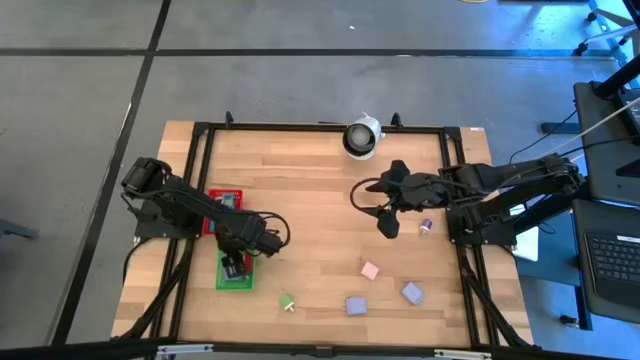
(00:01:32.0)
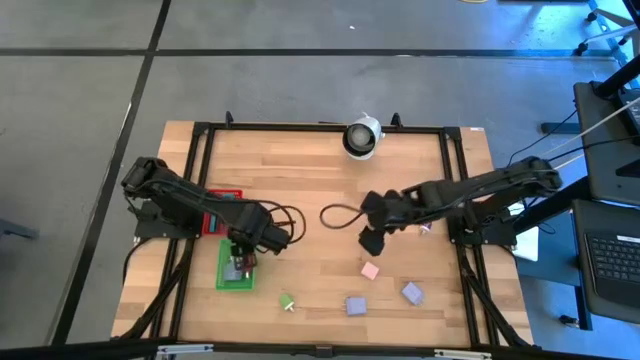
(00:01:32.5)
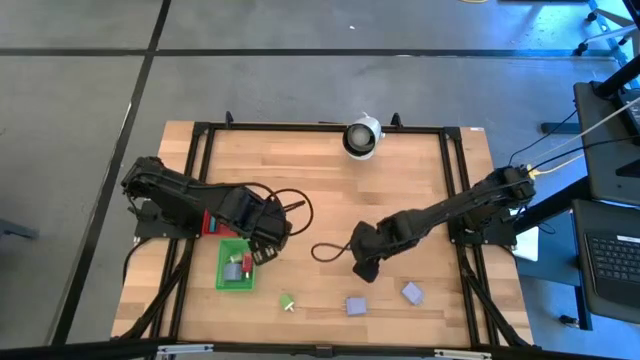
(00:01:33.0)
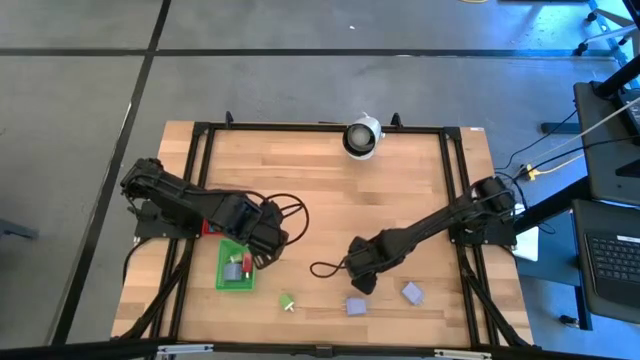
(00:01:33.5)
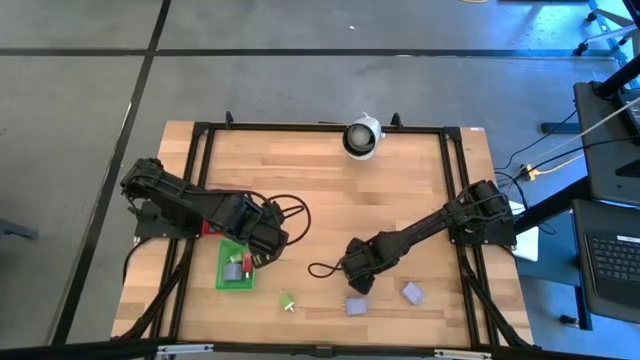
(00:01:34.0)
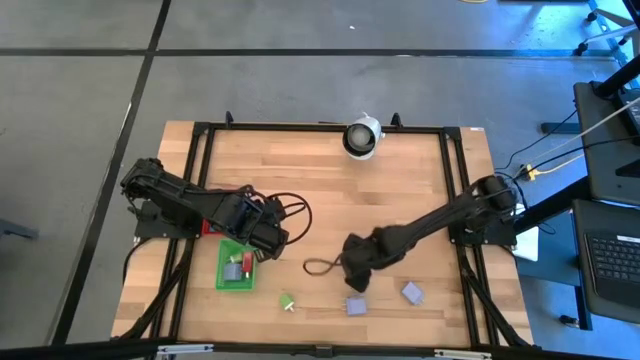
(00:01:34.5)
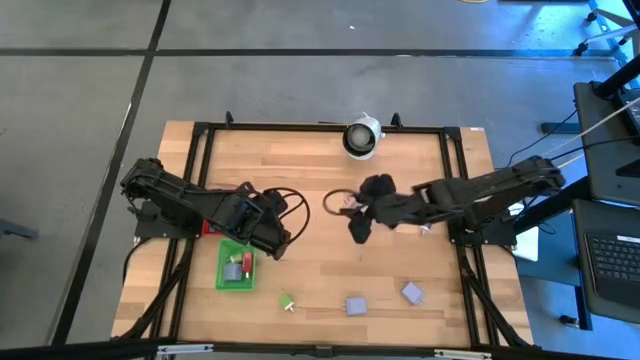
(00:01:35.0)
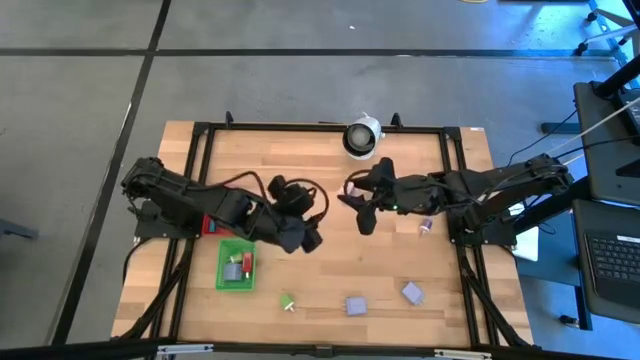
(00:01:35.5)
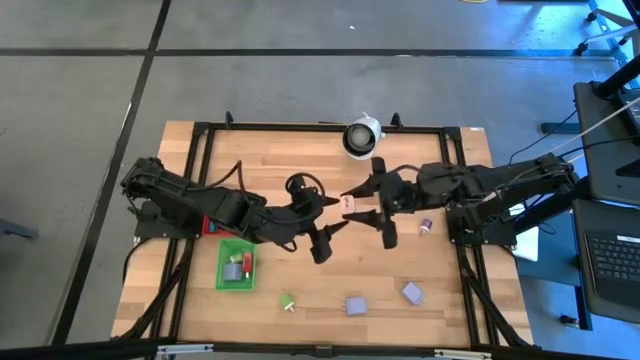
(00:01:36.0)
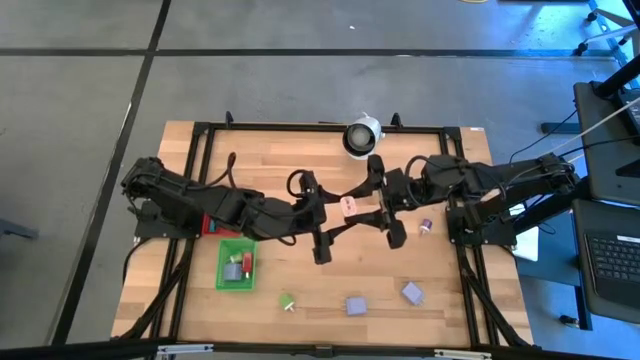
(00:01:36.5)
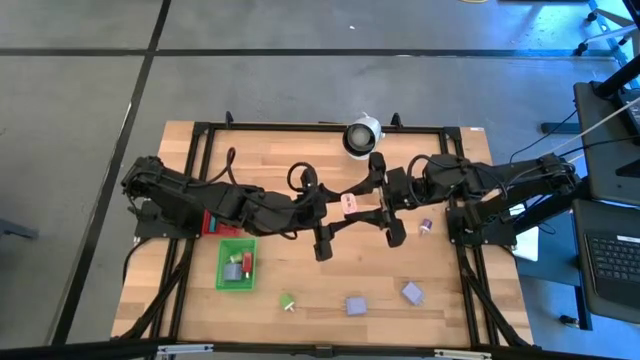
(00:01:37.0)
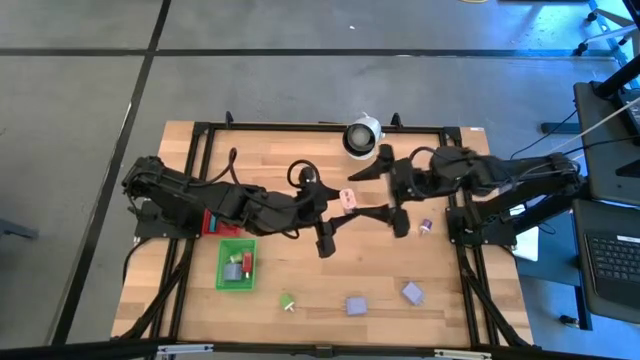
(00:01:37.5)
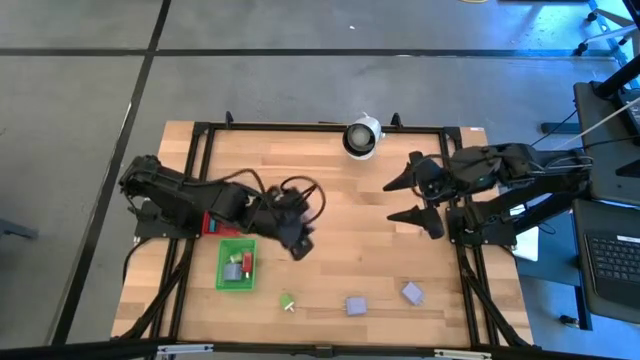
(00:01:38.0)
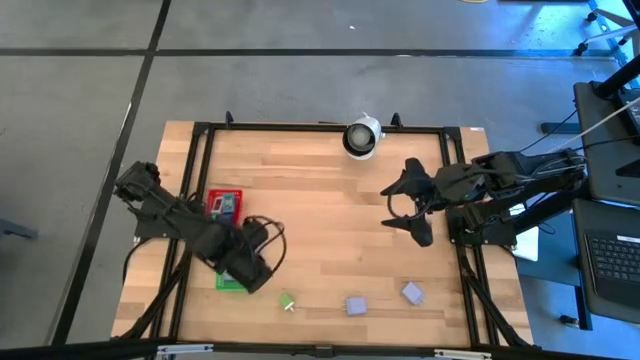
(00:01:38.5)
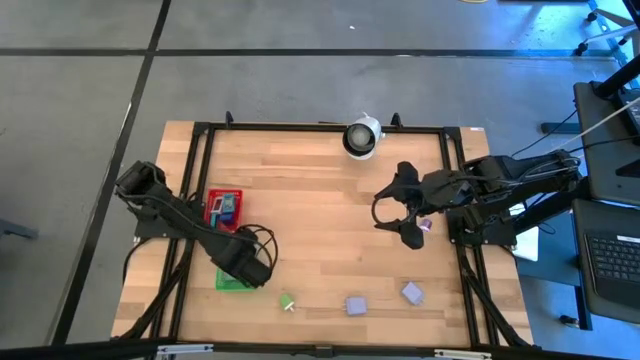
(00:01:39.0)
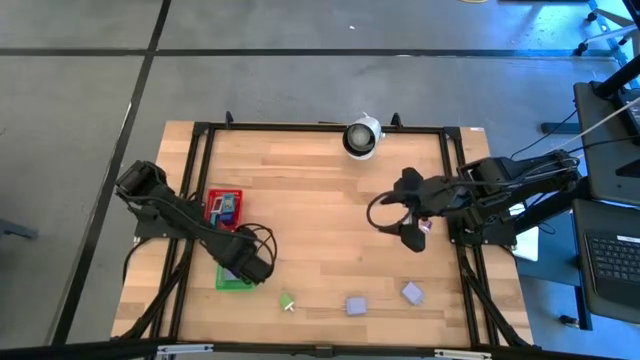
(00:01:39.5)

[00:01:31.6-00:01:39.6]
Task: Pick & Place Office items
Put the white charger adapter into the green bin

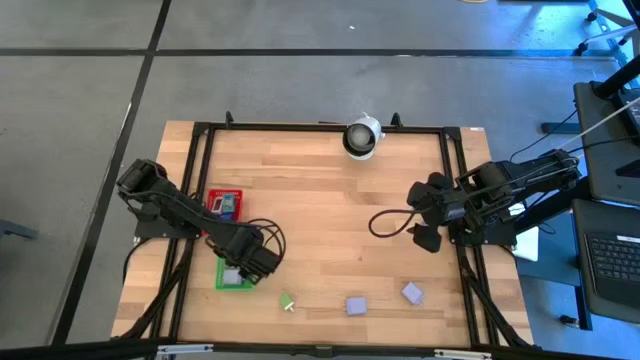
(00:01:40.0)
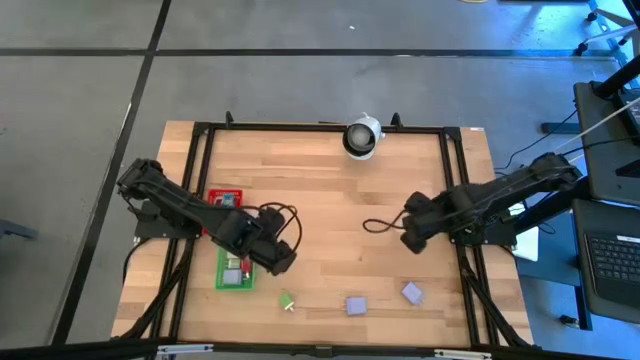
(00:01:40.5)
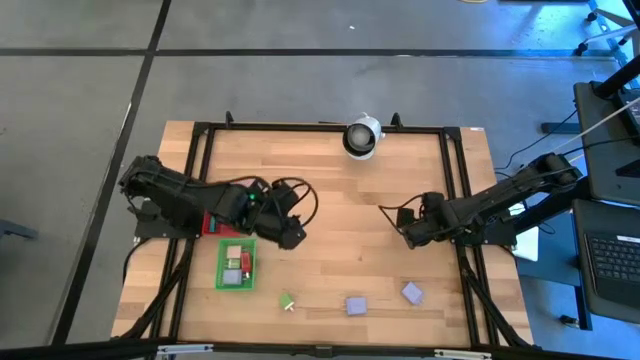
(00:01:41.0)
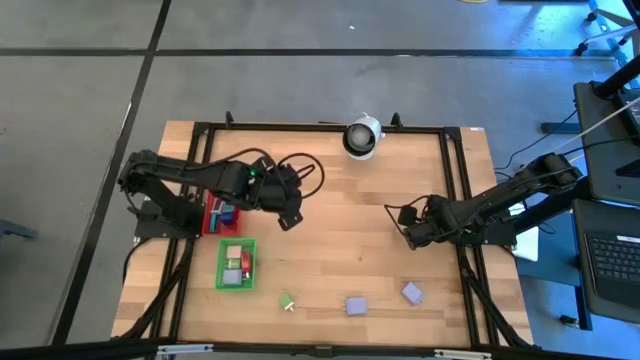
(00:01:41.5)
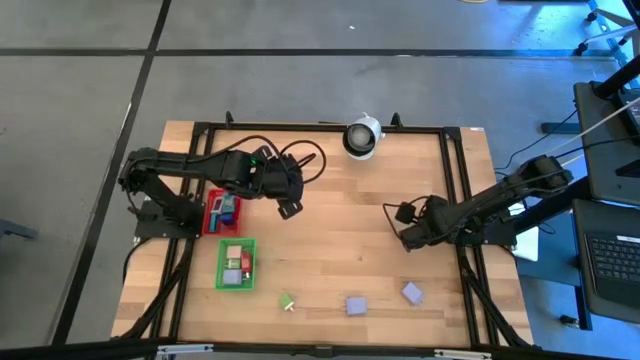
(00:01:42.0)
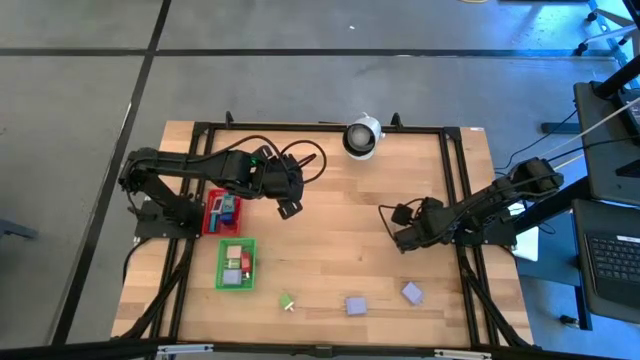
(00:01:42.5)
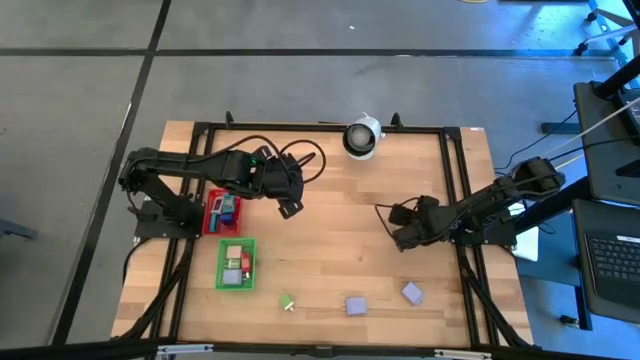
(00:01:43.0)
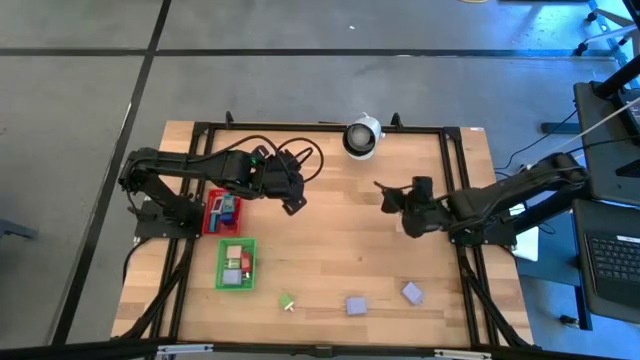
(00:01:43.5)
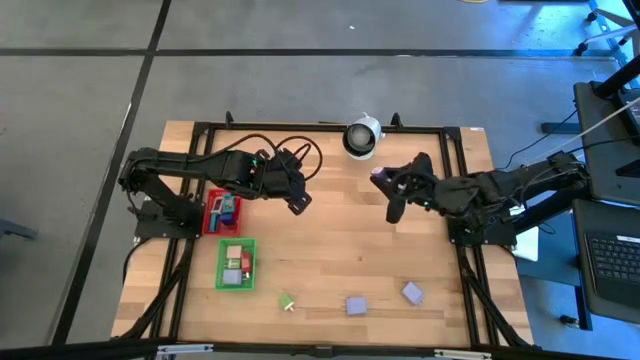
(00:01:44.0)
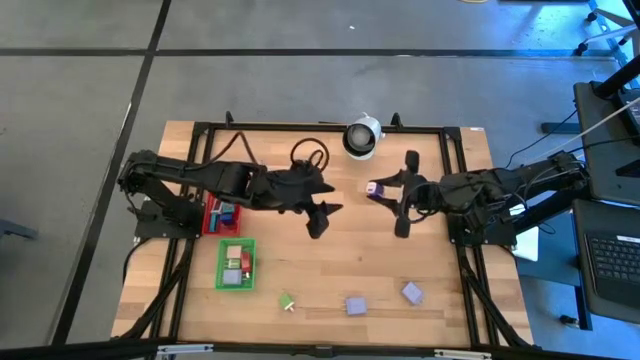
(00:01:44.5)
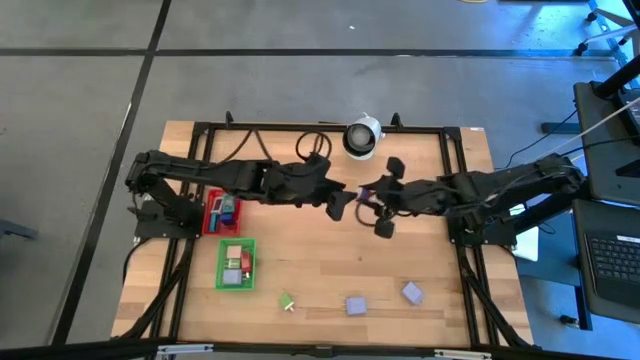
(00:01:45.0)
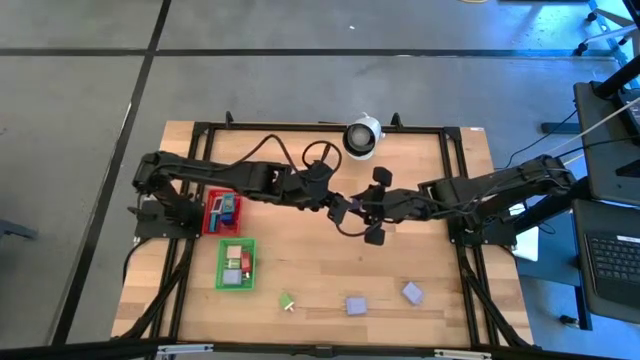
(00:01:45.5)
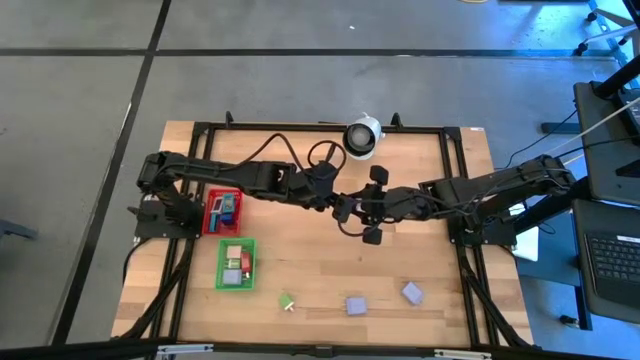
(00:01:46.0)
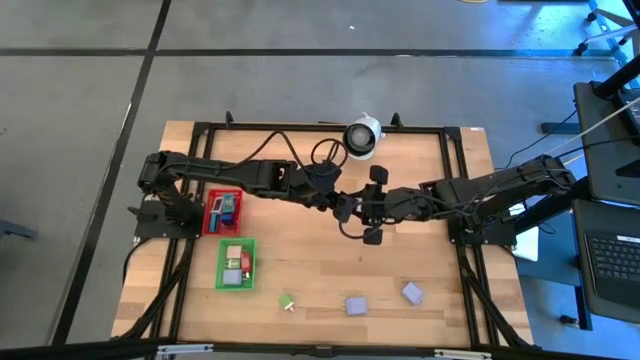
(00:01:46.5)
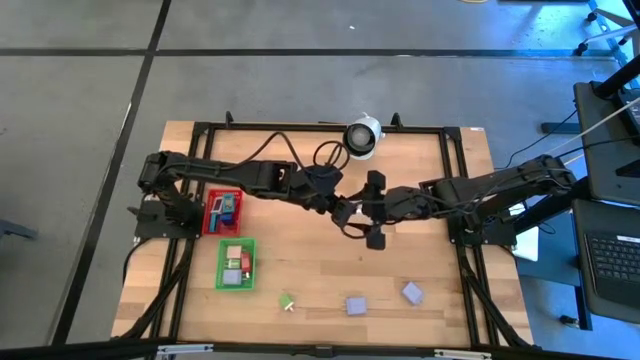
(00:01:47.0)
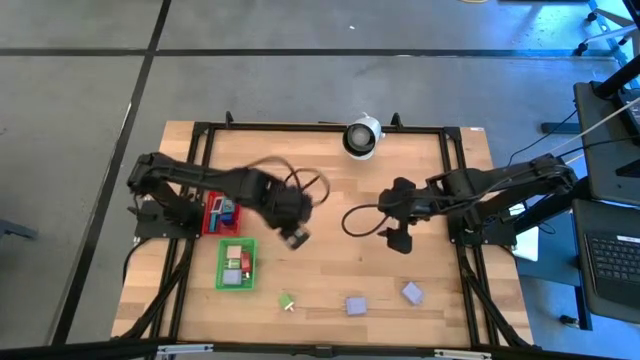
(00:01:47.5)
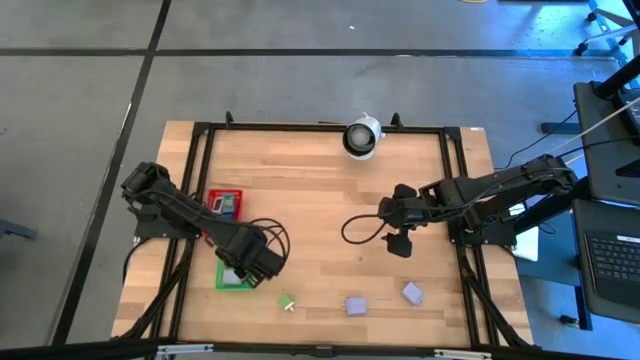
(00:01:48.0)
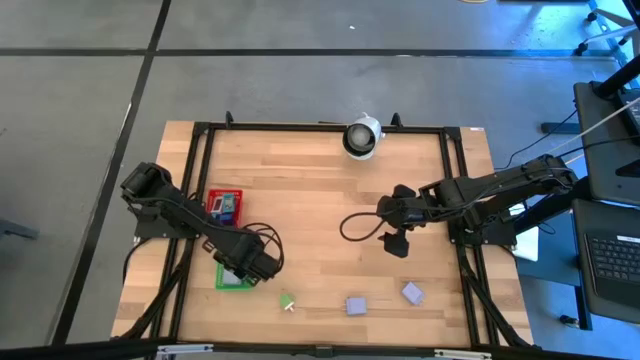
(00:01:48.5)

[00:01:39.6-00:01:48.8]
Put the violet charger adapter into the green bin

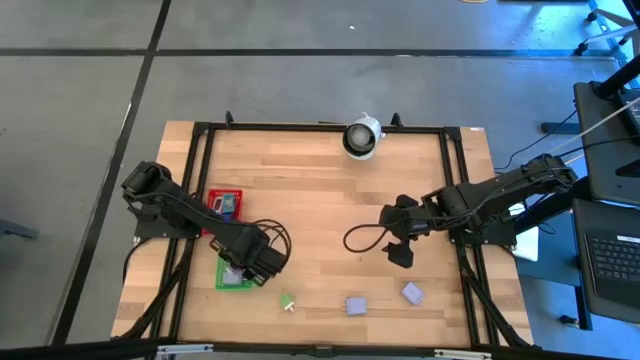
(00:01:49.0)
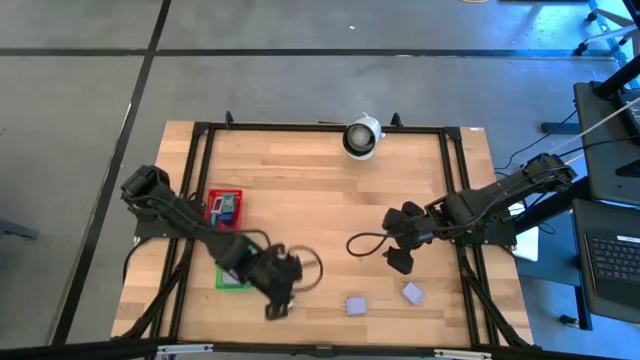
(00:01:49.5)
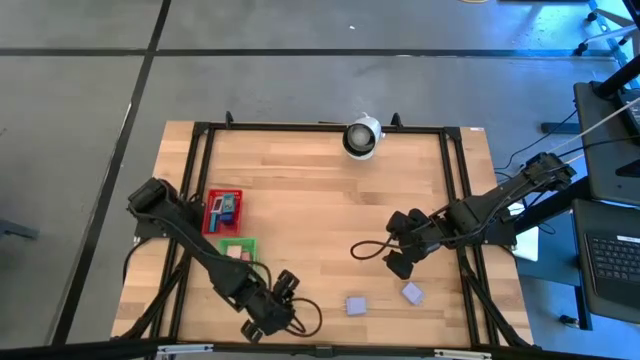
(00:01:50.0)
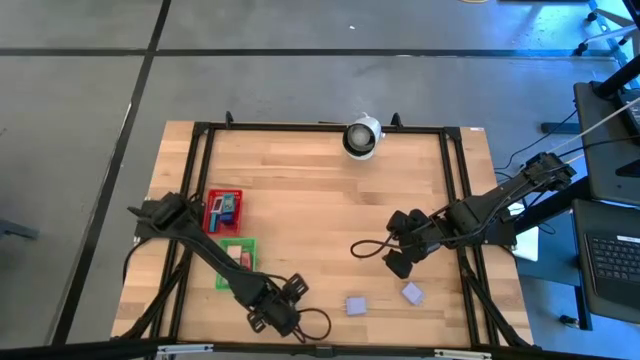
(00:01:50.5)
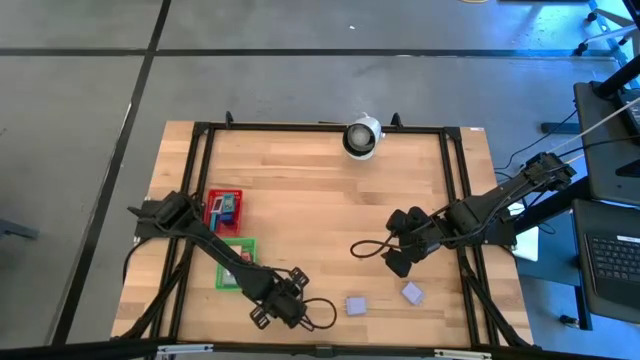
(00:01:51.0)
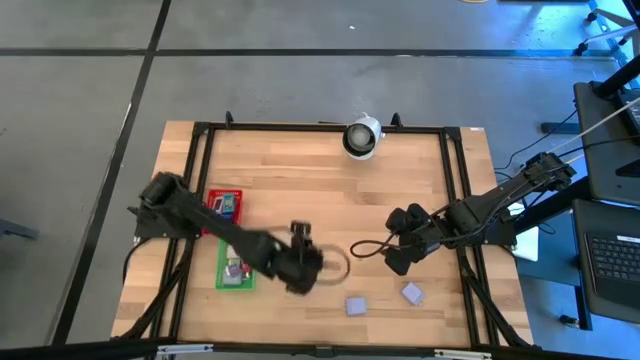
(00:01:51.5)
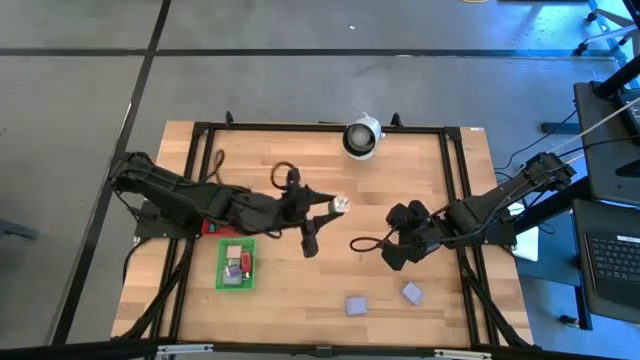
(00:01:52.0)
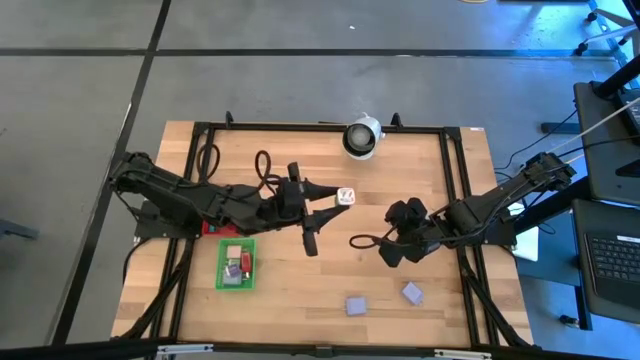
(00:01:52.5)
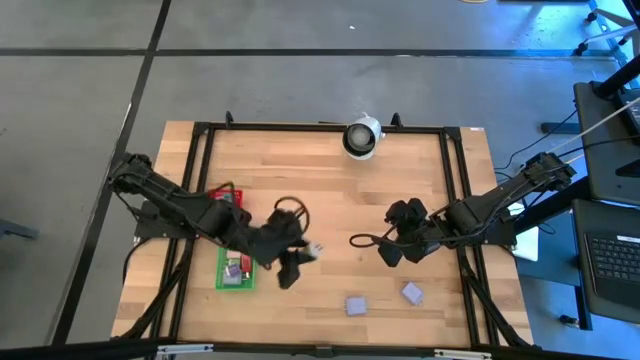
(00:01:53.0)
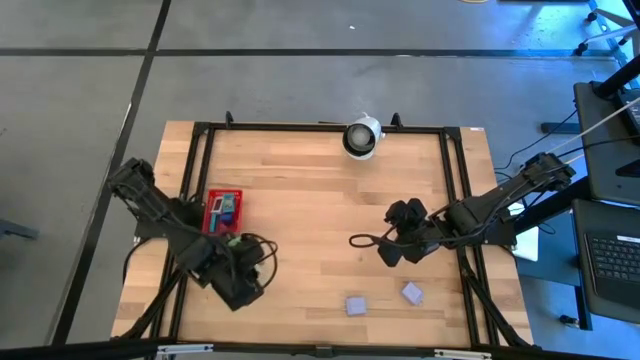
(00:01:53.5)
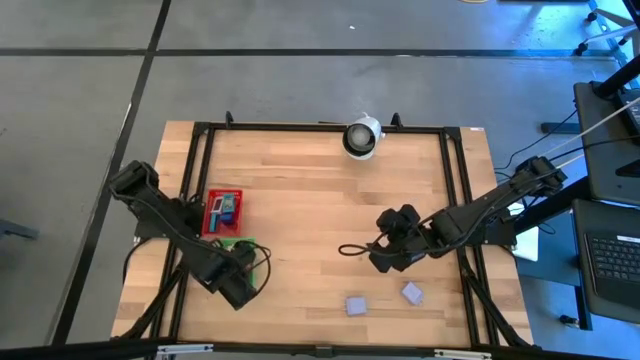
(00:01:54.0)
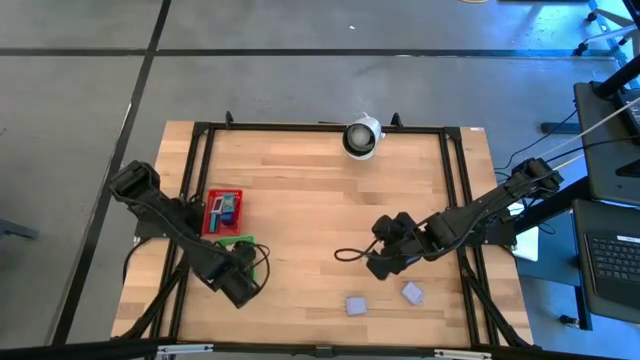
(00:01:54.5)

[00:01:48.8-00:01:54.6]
Put the green charger adapter into the green bin
